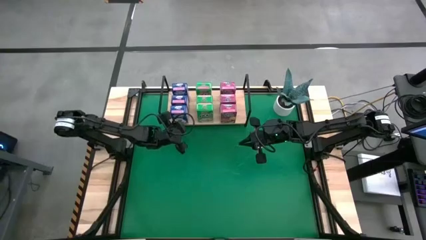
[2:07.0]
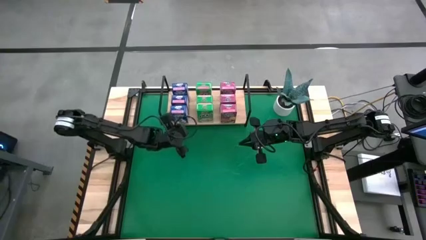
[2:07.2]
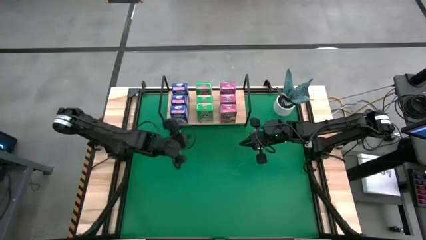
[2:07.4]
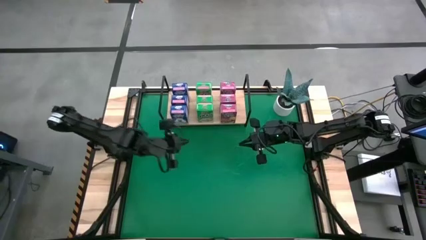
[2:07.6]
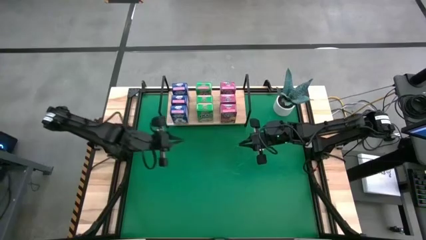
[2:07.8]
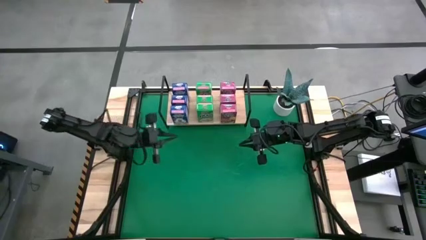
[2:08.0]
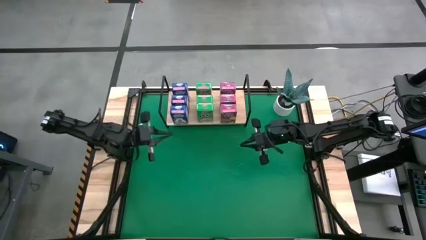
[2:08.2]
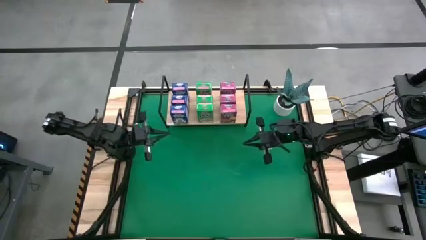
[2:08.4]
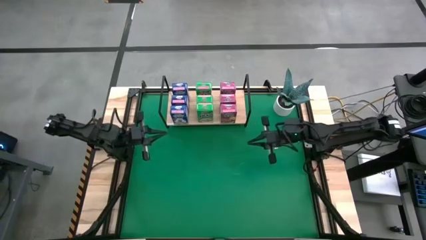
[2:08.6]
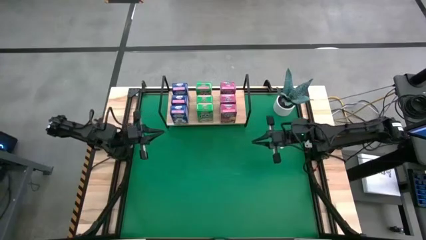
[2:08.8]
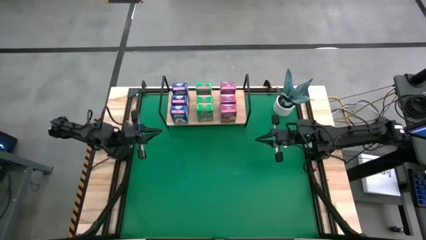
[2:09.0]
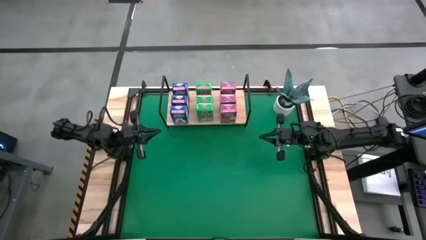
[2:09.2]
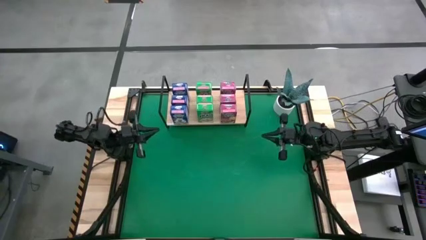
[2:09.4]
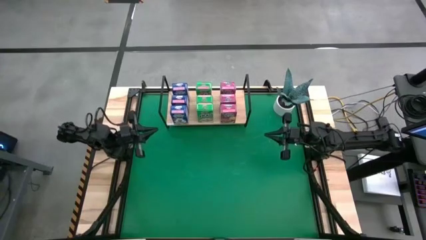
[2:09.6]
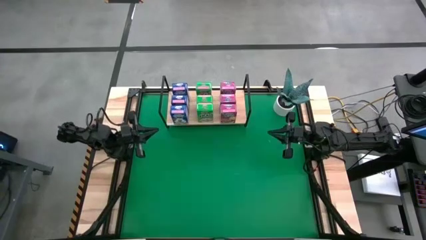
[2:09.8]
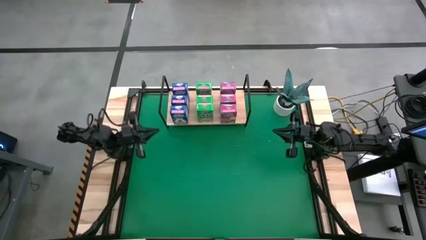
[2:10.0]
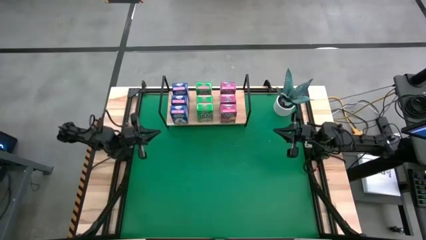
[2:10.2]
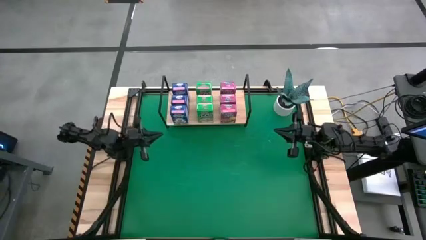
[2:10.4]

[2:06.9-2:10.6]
Task: Stack cereal on shelf
Return to Home Position

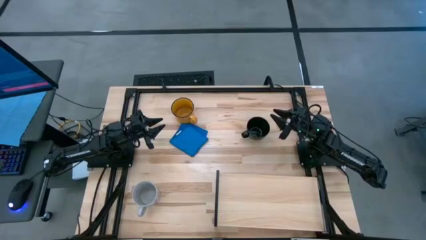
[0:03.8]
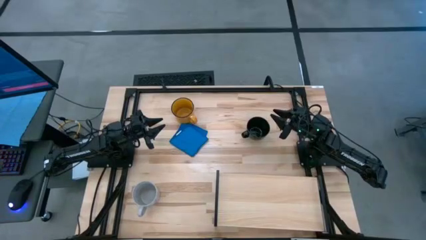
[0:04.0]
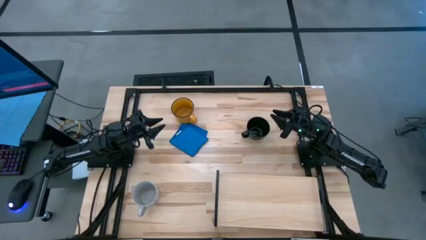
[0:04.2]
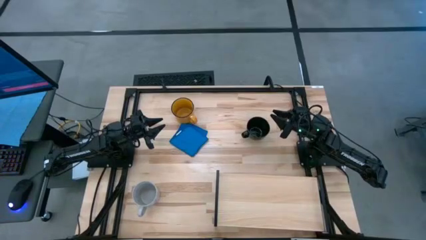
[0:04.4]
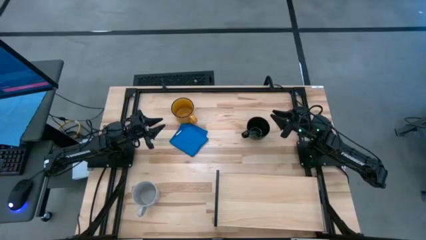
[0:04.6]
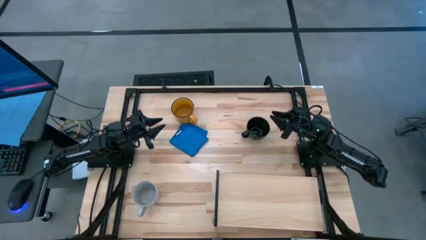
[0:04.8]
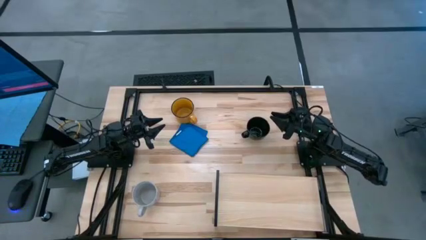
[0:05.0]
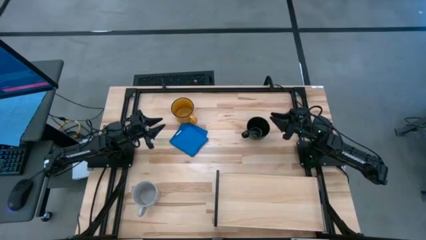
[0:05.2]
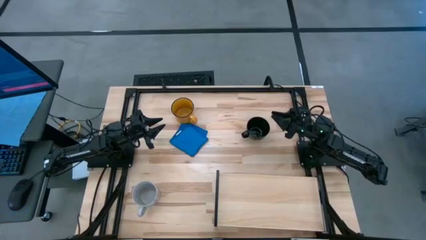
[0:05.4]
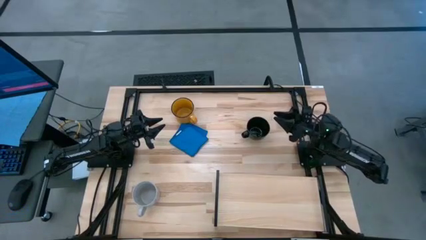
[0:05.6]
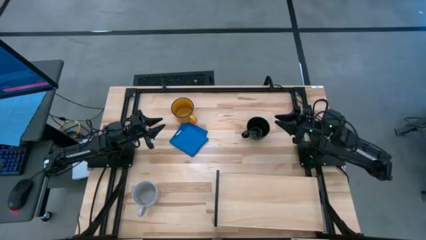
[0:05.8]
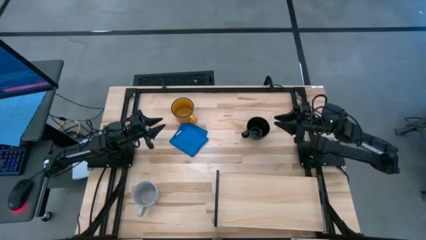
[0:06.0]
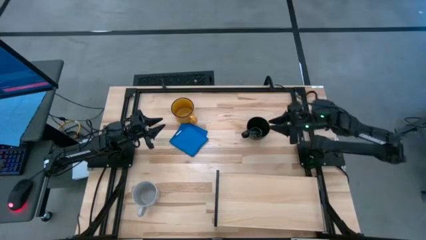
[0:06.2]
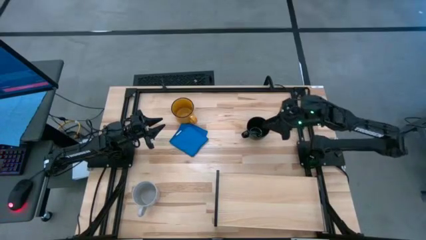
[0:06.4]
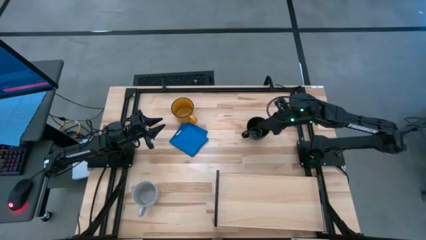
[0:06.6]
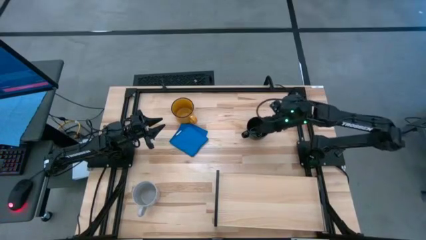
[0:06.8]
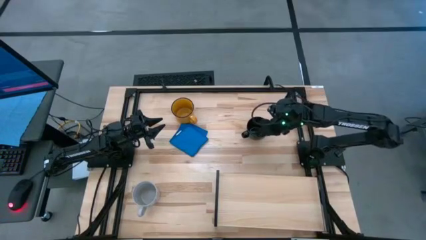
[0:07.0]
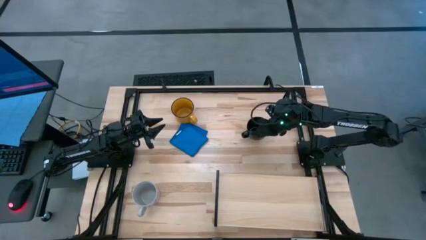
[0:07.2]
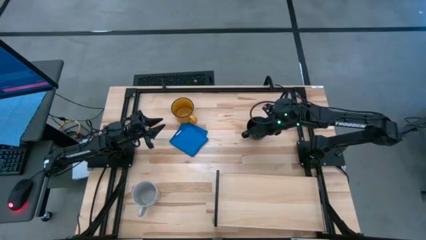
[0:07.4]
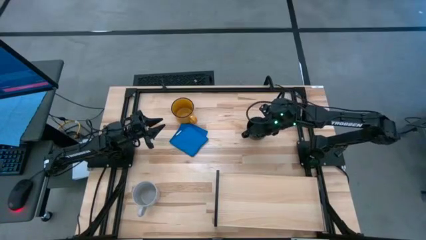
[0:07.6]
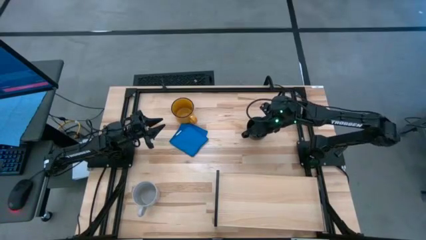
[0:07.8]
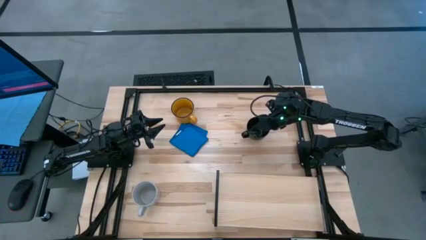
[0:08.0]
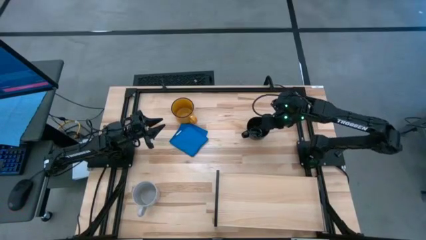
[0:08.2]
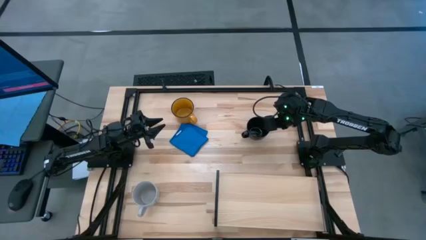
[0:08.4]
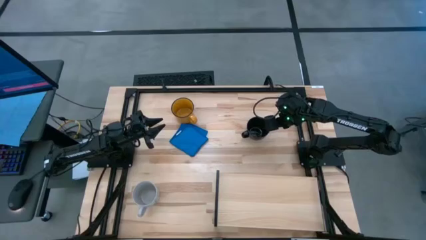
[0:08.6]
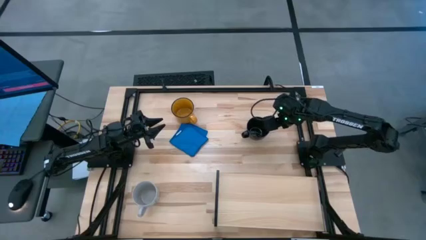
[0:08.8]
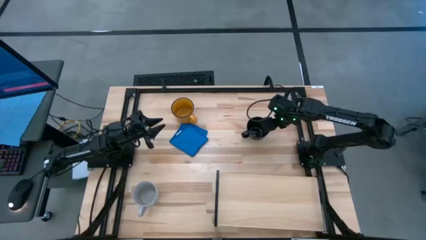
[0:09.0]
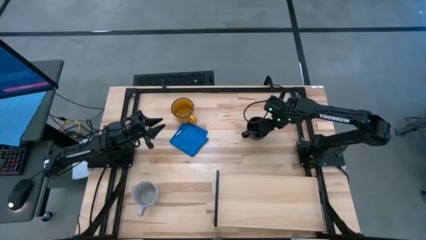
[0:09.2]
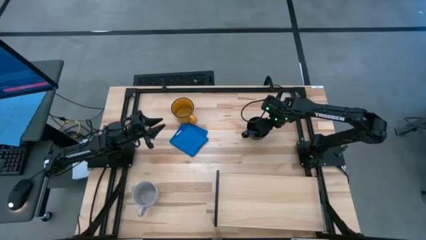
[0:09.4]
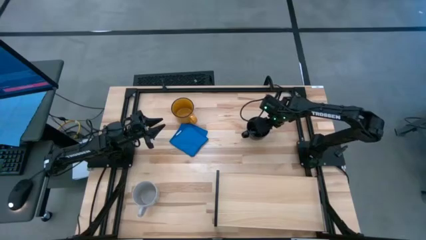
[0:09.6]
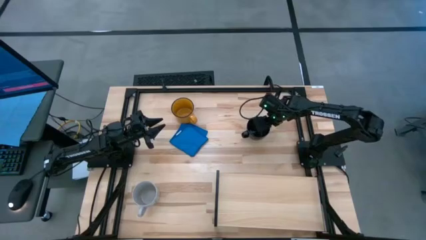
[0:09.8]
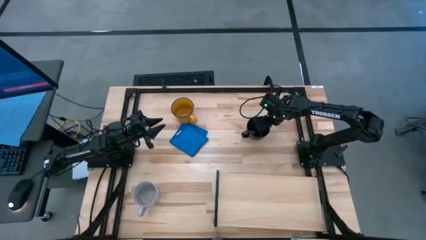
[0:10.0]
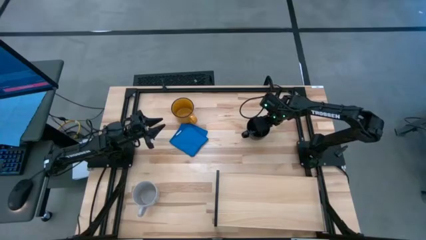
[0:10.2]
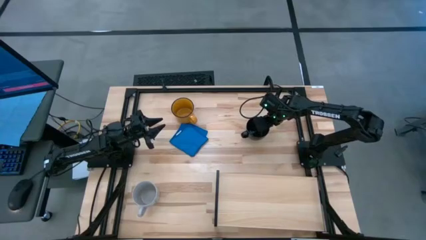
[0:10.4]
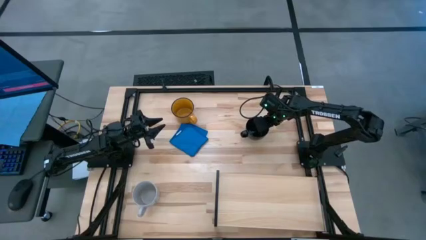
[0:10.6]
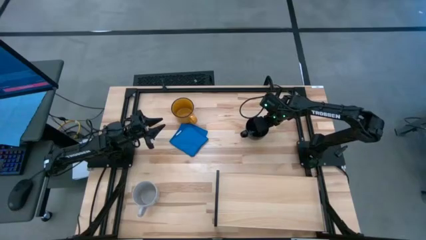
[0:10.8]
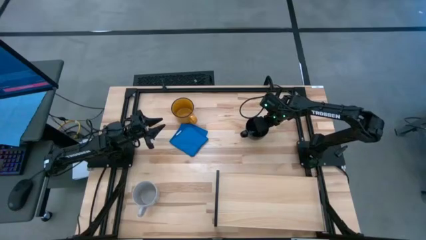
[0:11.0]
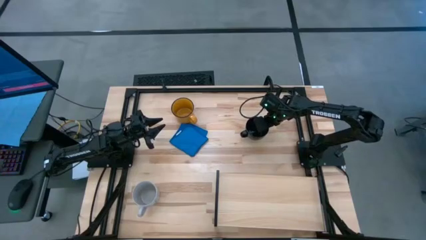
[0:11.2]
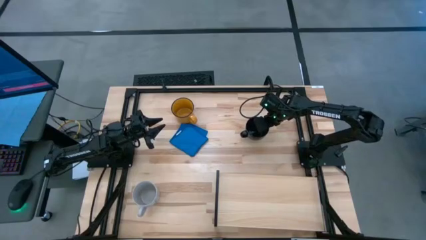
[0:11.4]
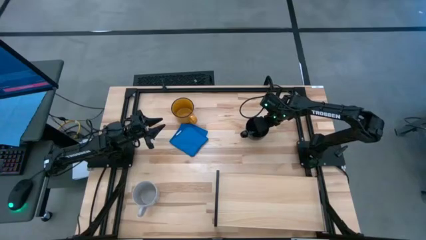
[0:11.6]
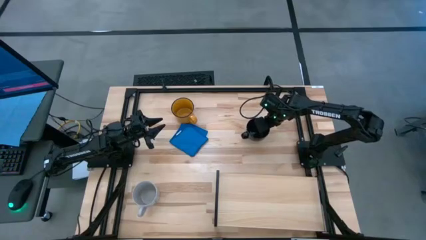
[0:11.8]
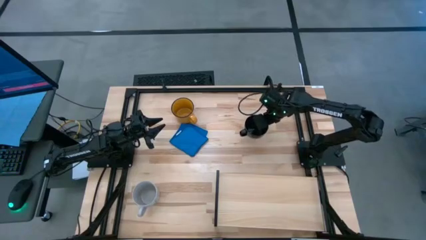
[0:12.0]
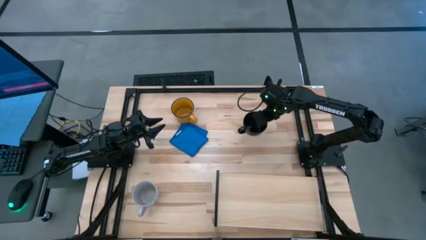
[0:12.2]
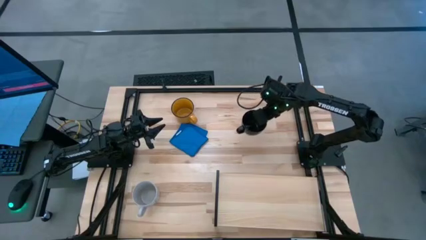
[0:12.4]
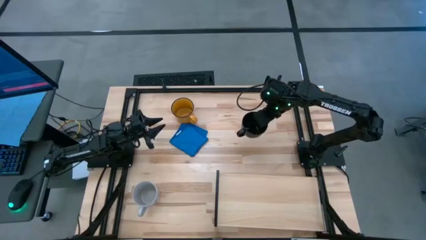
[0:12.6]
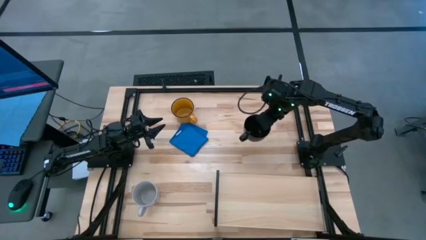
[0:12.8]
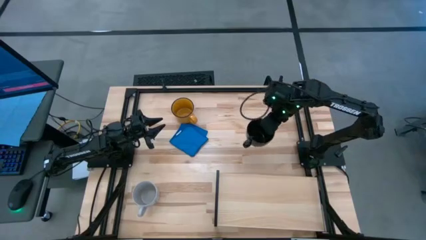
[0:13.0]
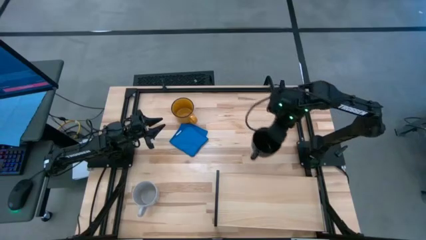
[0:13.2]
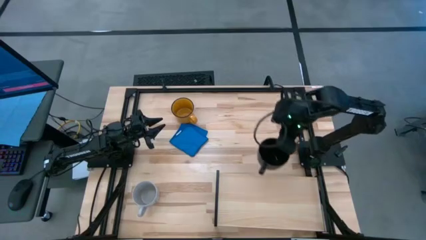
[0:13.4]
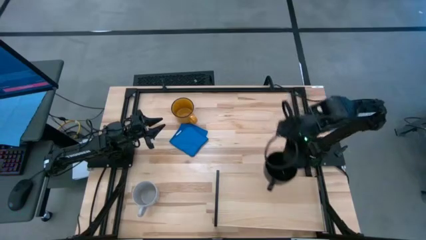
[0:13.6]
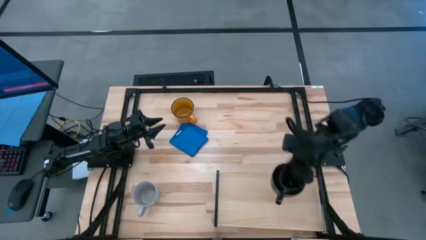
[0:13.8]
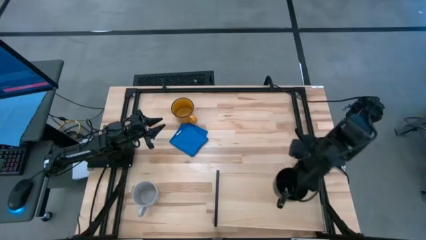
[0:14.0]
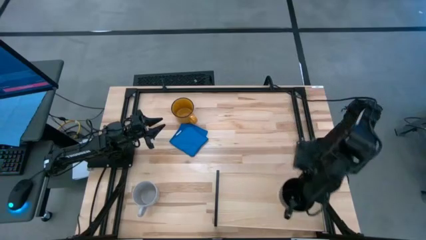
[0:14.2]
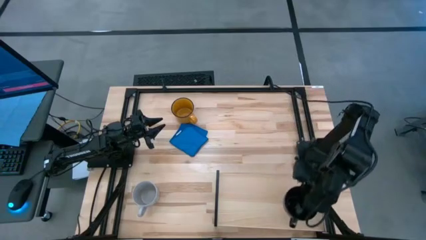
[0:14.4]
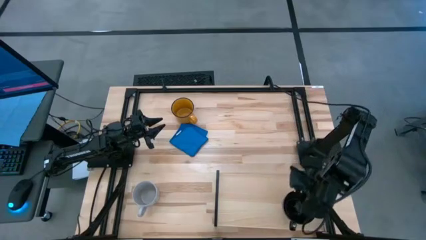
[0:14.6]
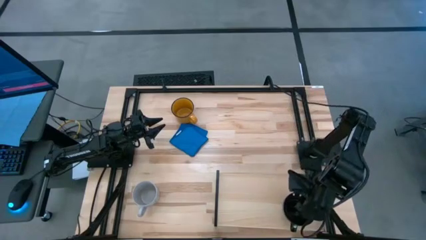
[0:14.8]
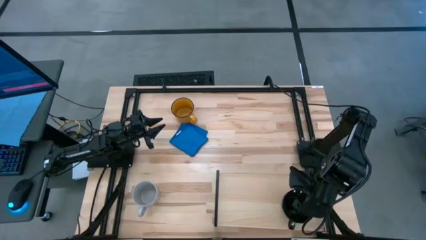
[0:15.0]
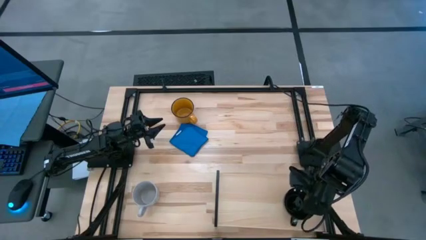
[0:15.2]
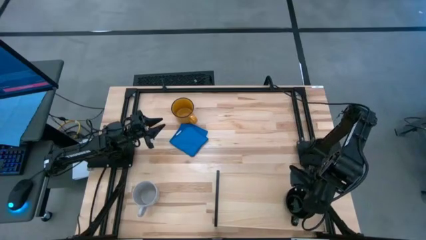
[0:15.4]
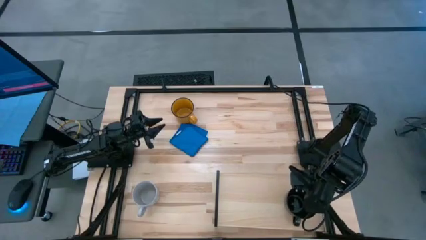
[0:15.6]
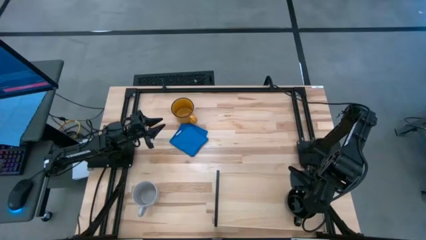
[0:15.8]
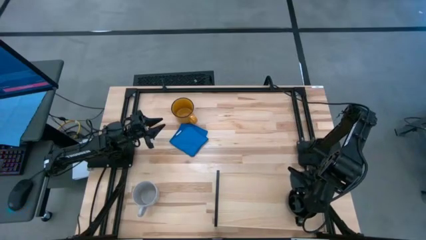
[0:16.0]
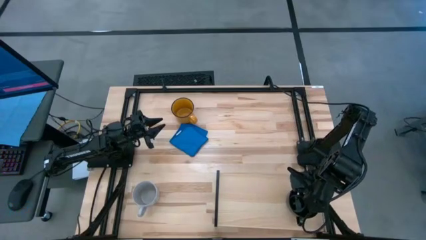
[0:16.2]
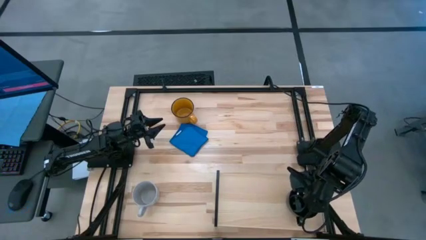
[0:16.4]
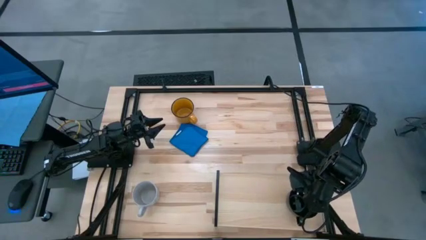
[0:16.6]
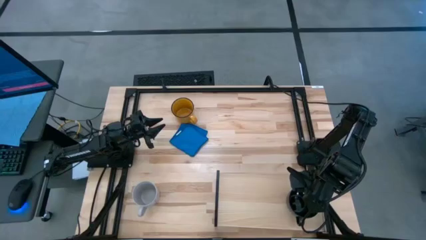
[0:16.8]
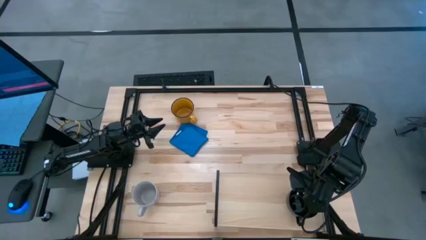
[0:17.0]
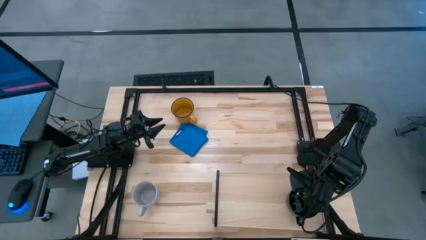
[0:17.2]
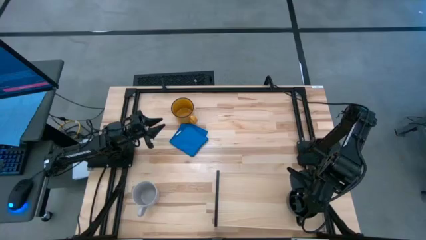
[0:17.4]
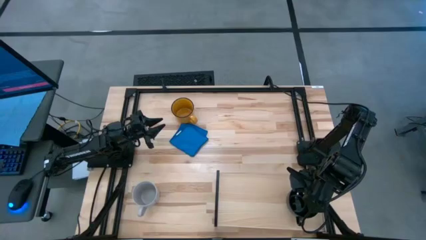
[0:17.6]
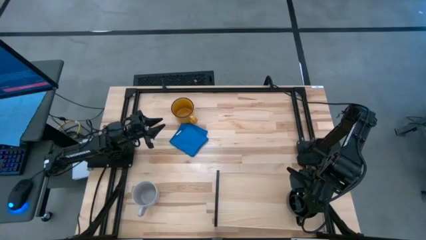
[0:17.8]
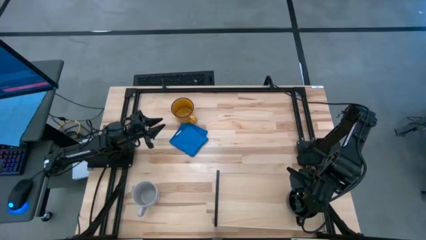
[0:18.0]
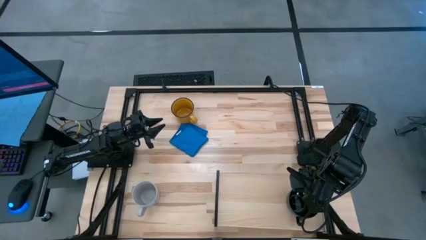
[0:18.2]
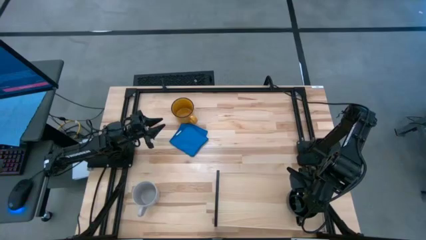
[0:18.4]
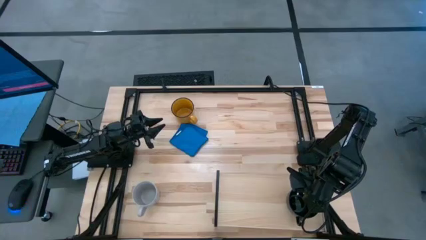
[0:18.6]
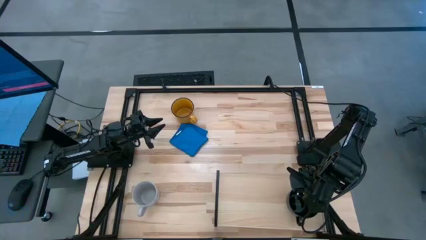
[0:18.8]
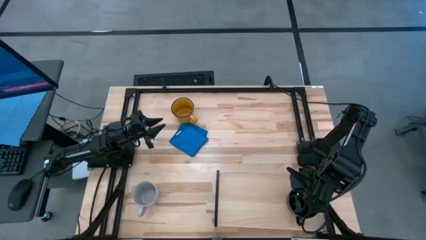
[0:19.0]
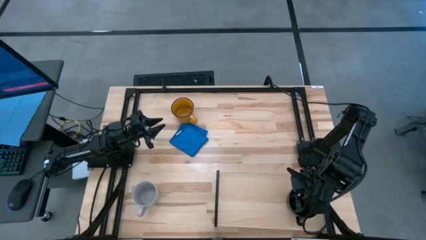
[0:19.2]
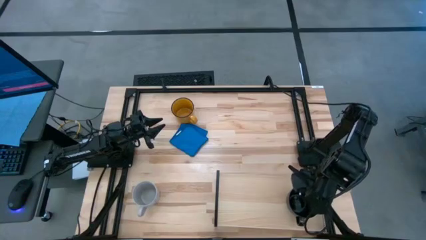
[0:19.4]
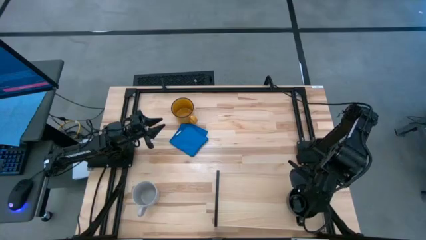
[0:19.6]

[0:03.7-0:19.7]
Task: Stack small to large cups/mugs on shelf
Put the black mug on the shelf
